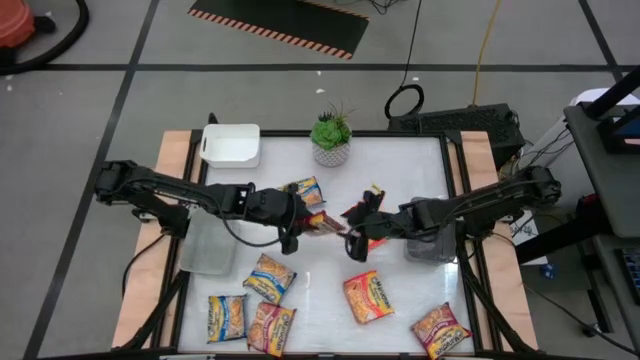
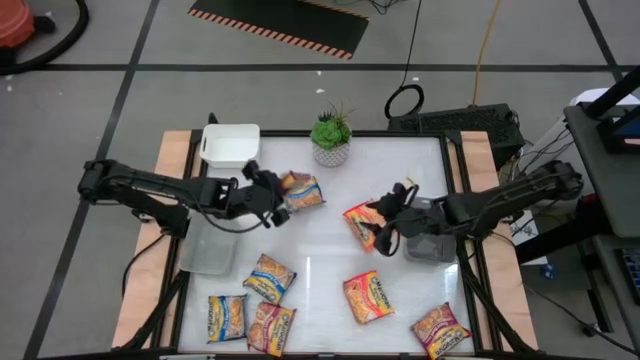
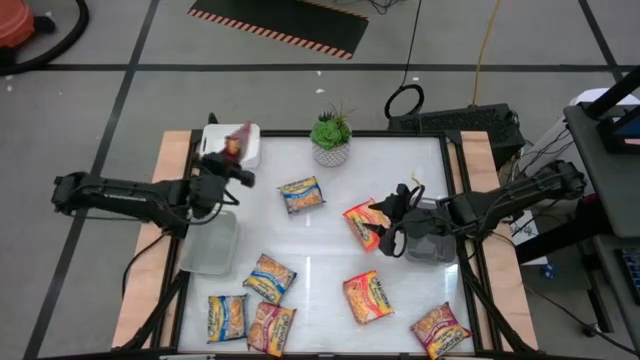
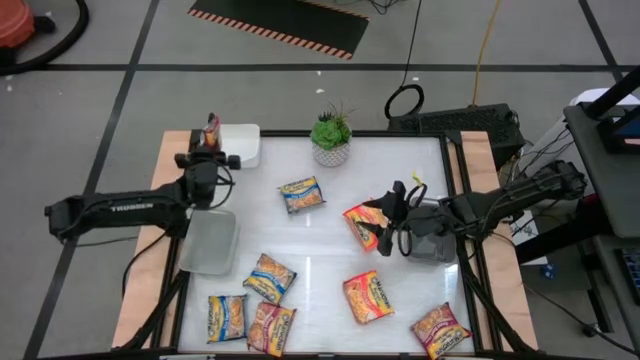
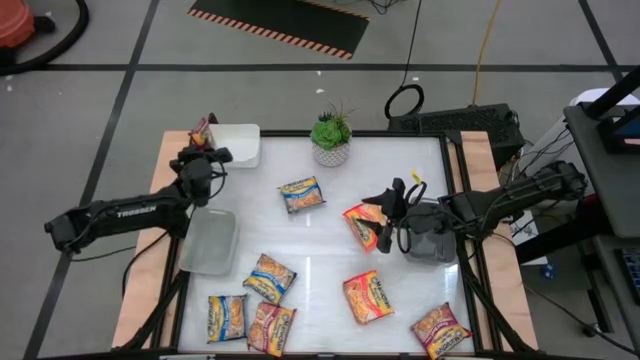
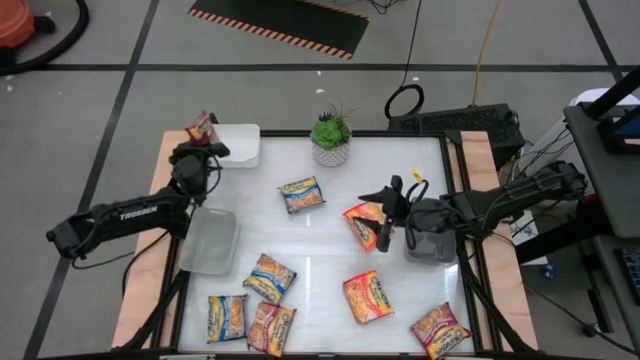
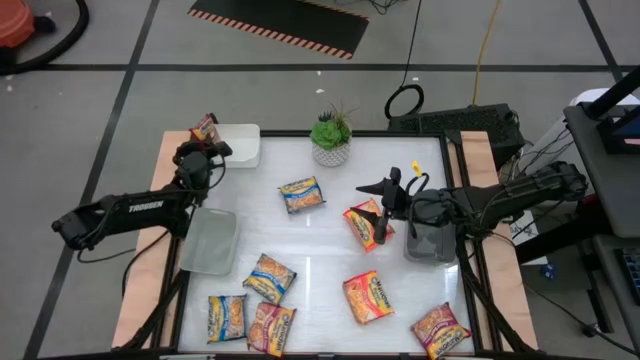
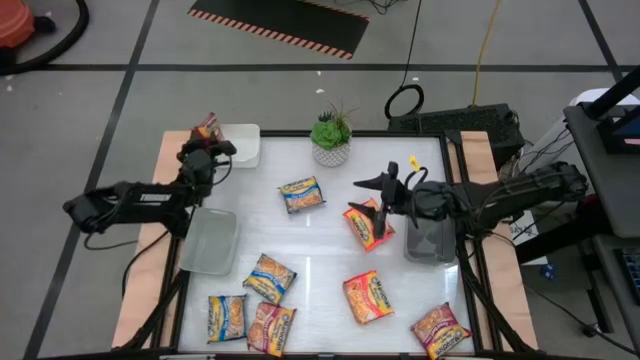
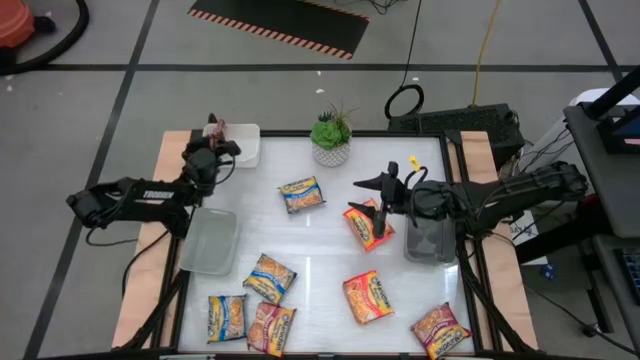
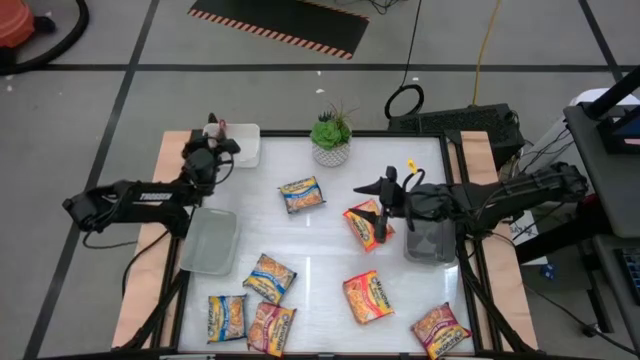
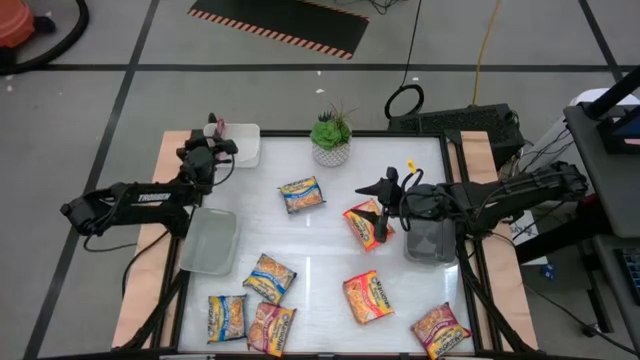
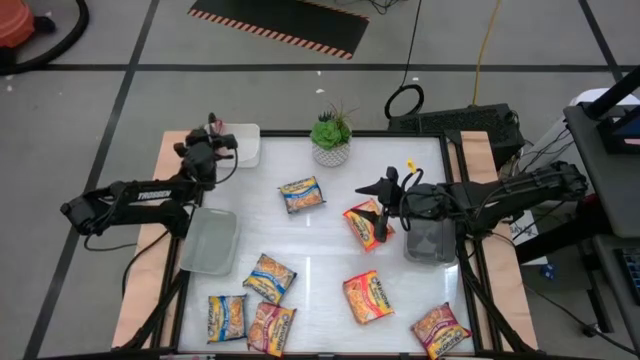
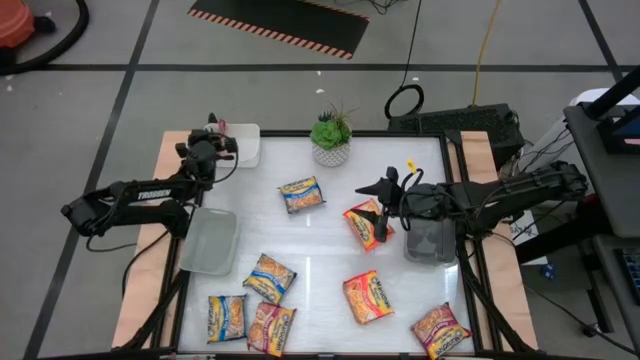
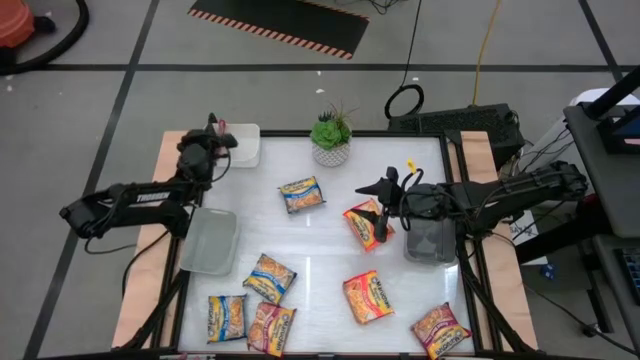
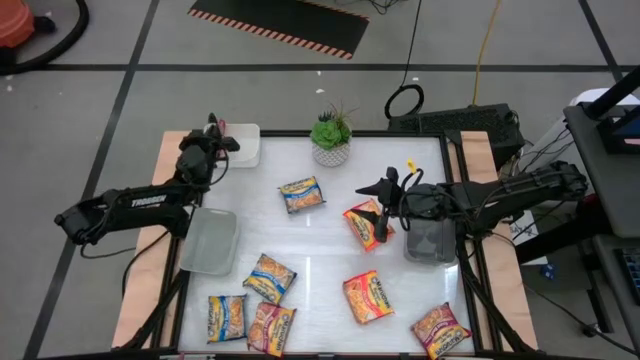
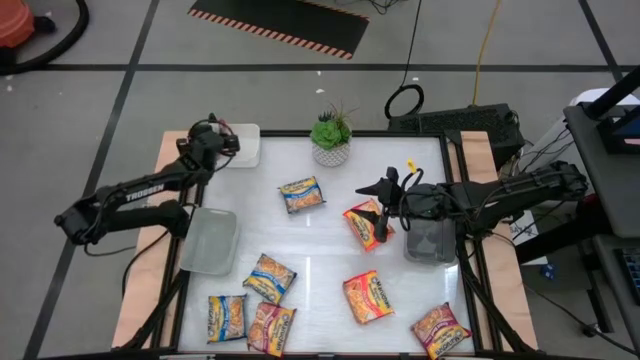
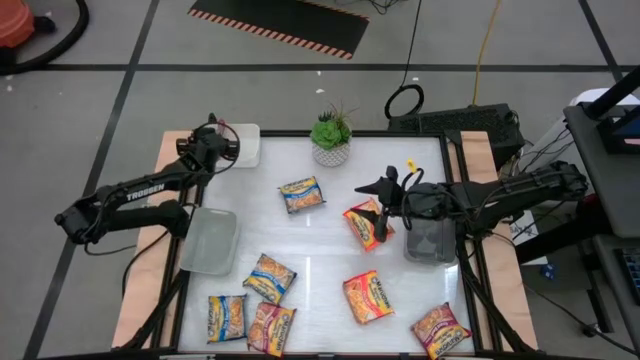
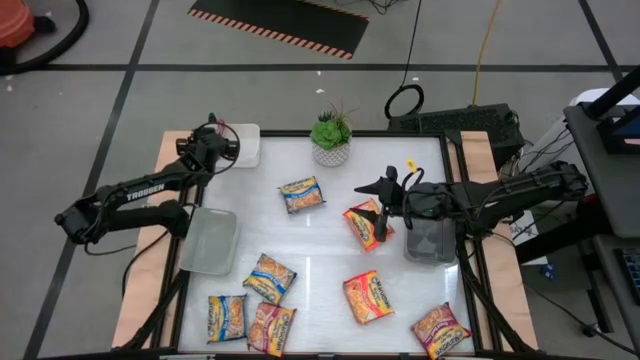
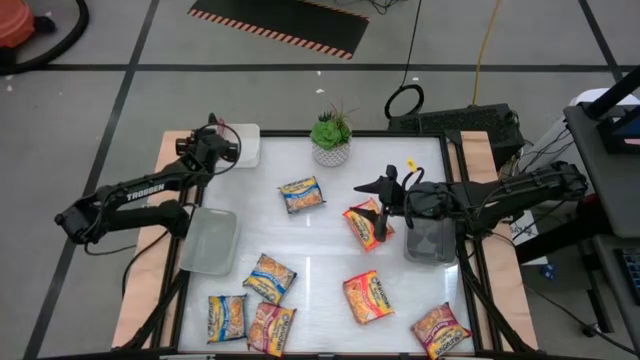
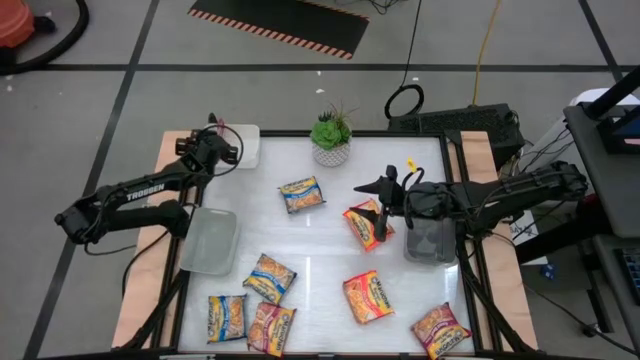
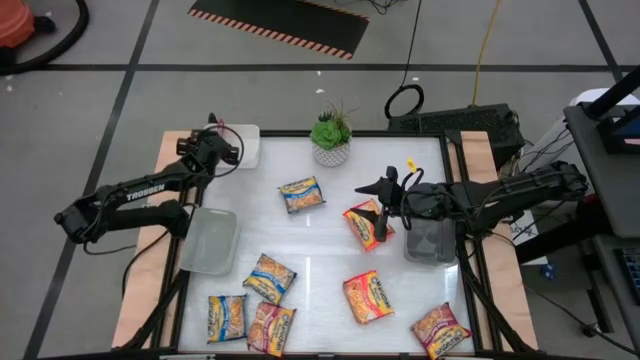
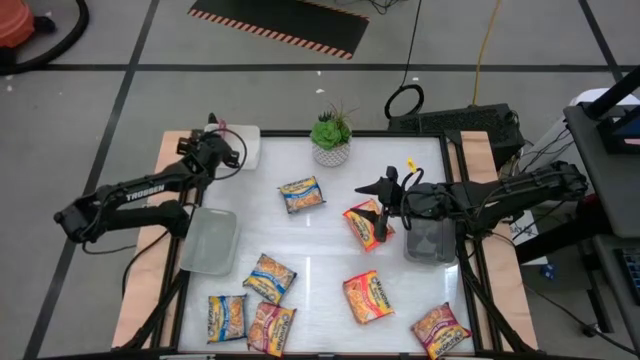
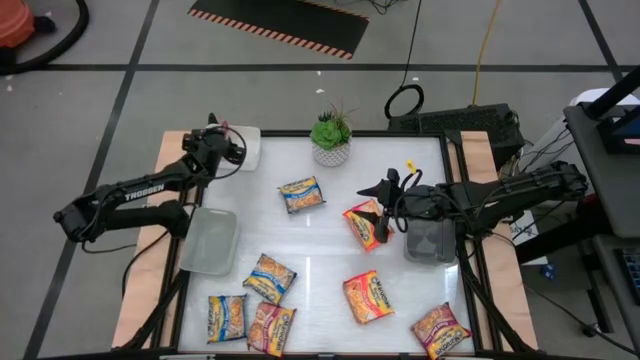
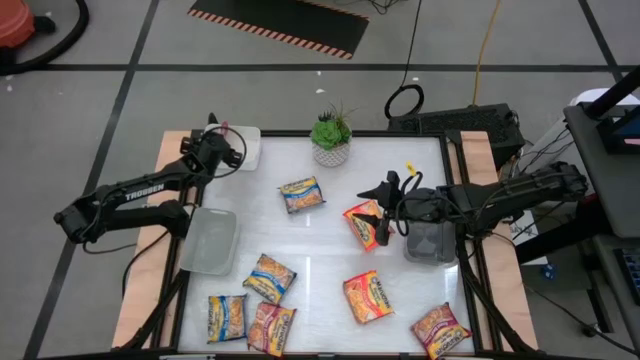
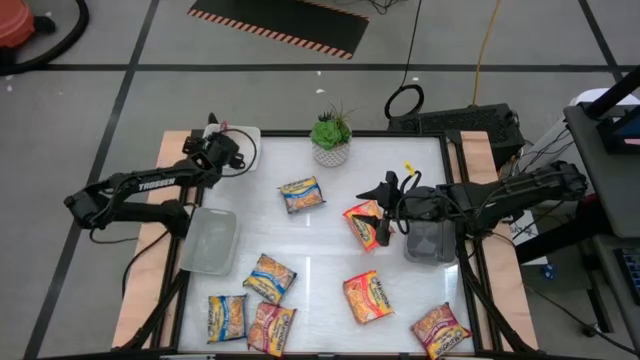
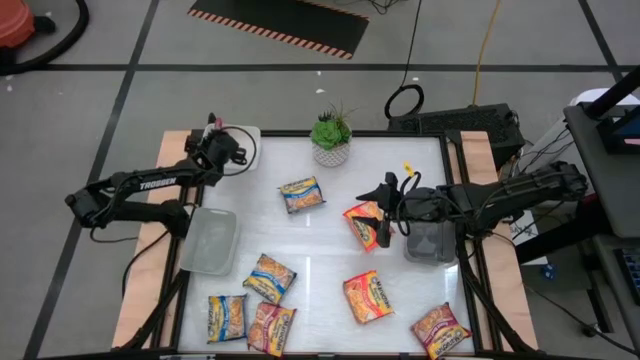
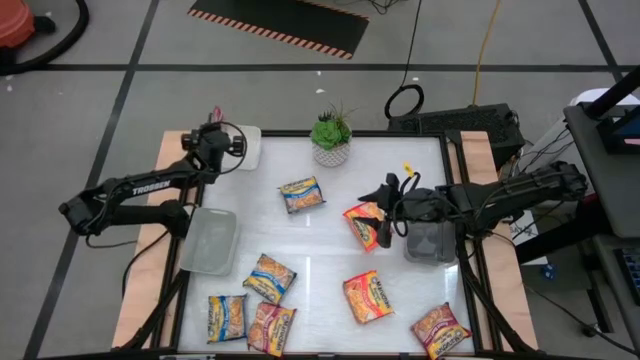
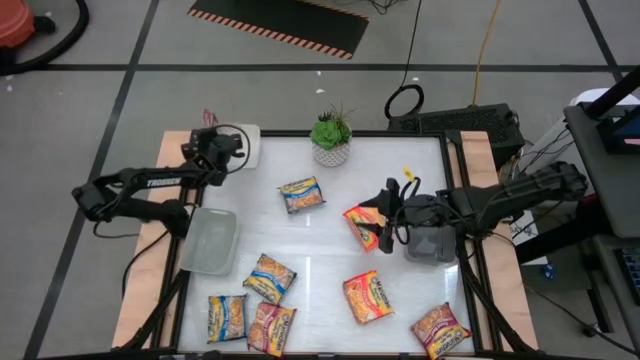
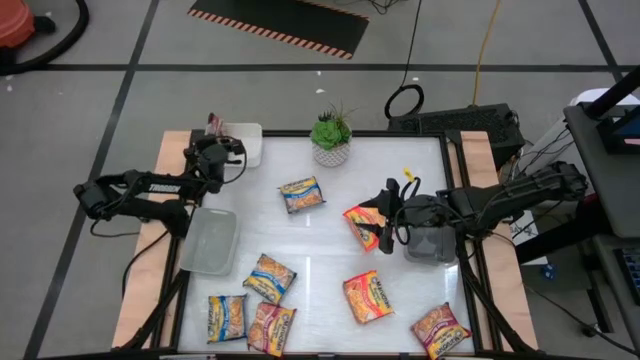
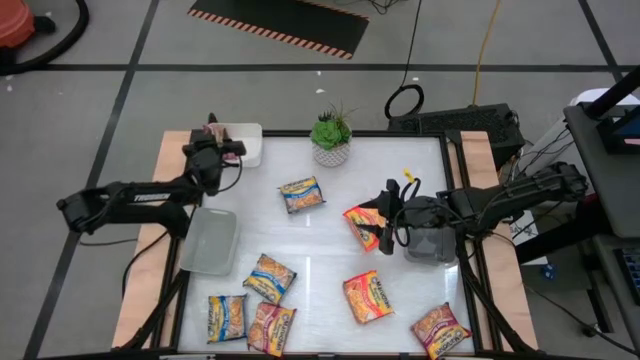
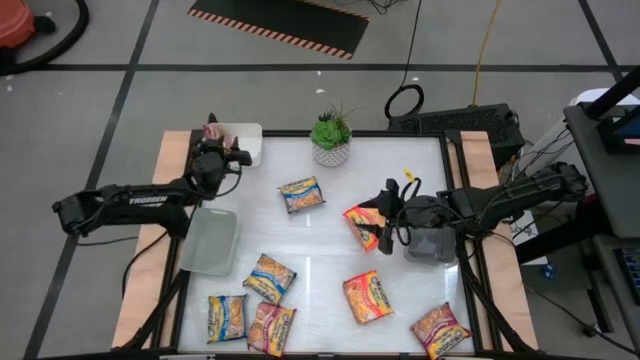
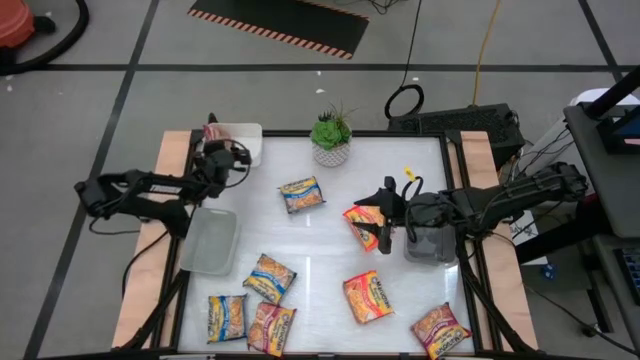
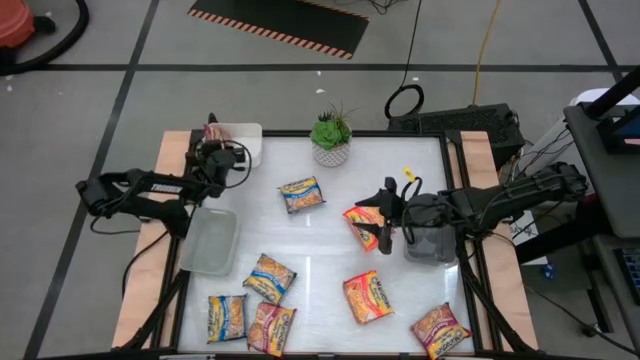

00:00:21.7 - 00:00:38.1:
Task: Sort Maruchan noodles
Put the top red noodle pack into the white bin
